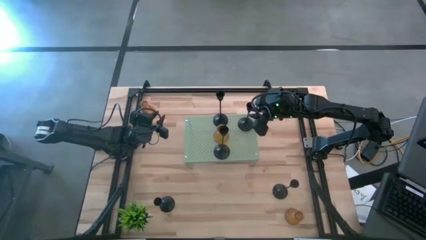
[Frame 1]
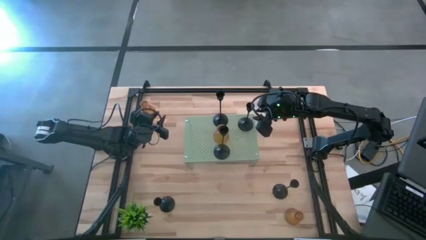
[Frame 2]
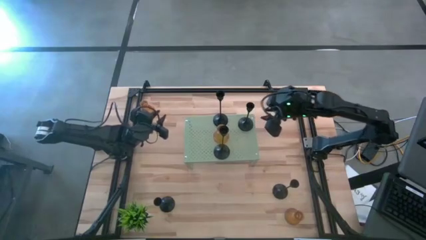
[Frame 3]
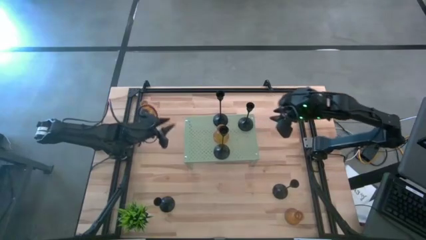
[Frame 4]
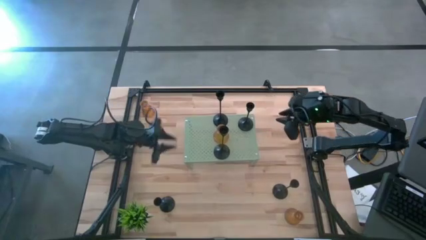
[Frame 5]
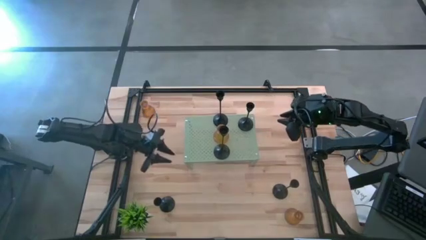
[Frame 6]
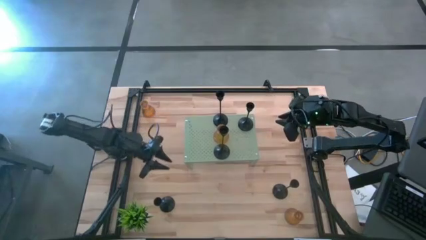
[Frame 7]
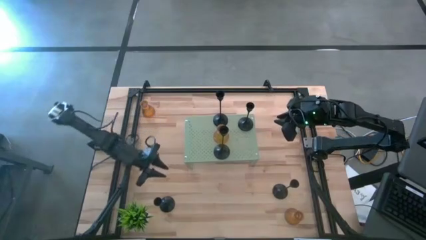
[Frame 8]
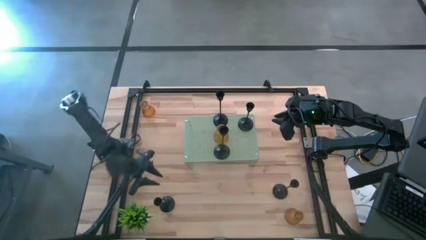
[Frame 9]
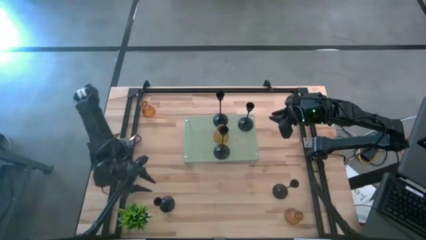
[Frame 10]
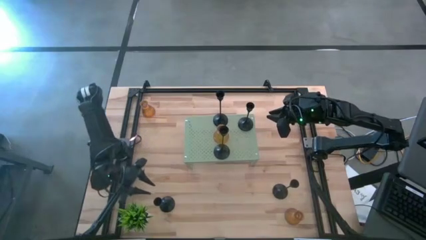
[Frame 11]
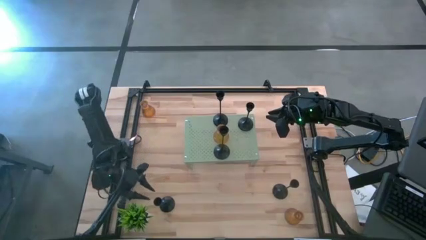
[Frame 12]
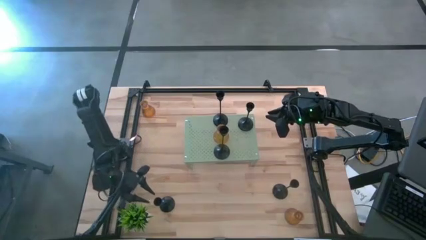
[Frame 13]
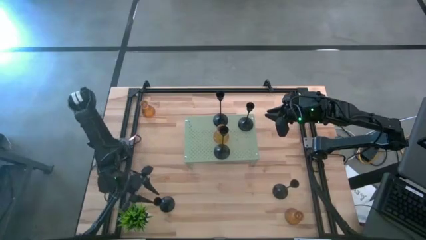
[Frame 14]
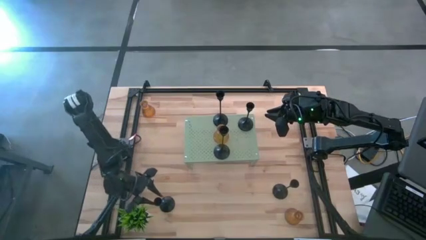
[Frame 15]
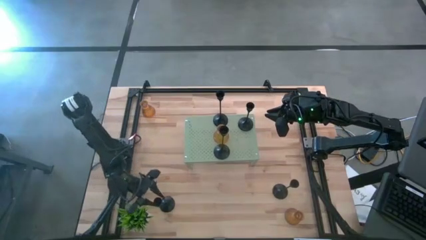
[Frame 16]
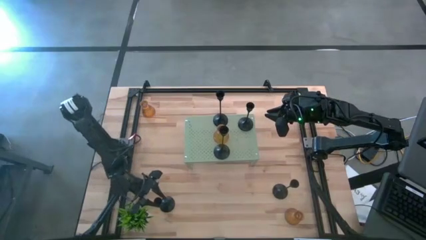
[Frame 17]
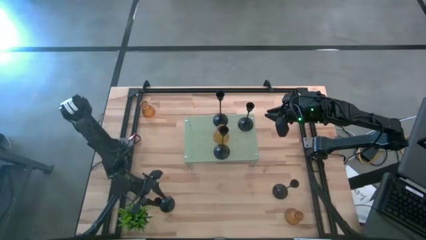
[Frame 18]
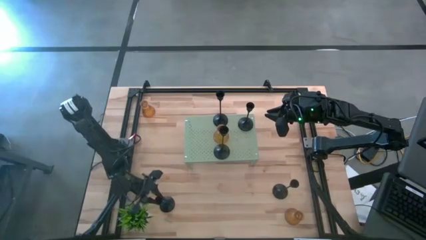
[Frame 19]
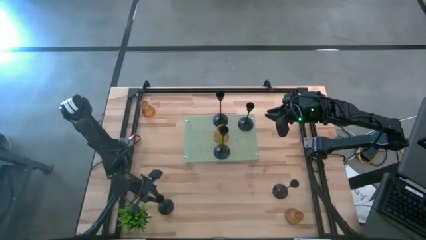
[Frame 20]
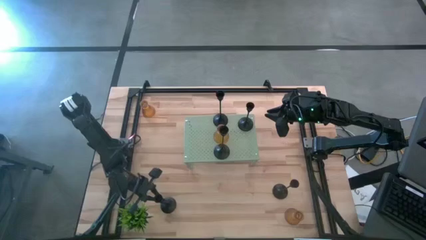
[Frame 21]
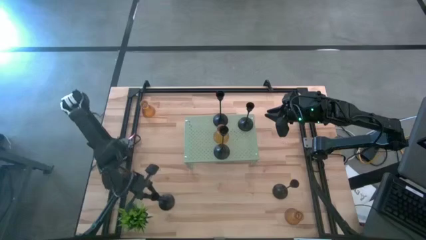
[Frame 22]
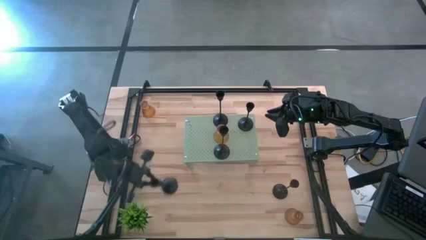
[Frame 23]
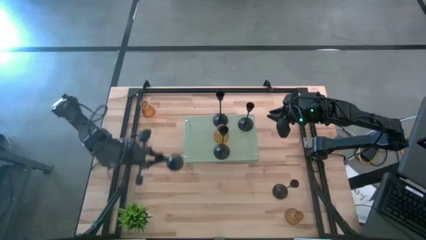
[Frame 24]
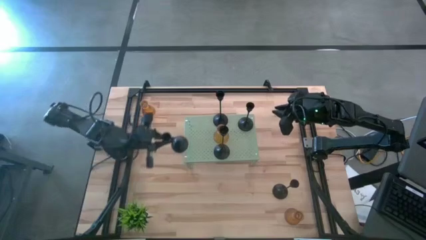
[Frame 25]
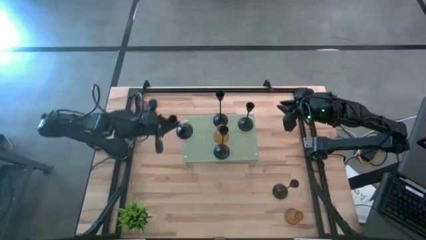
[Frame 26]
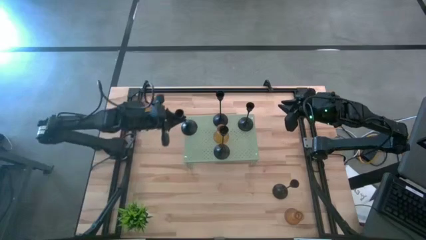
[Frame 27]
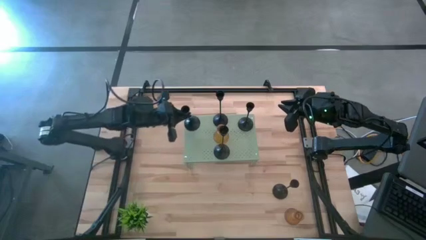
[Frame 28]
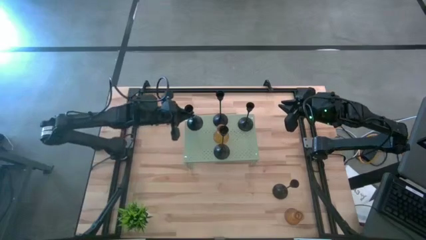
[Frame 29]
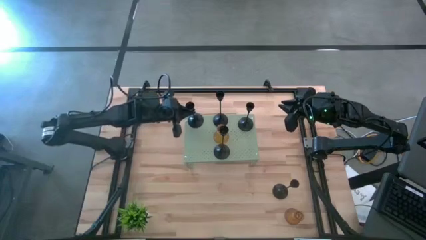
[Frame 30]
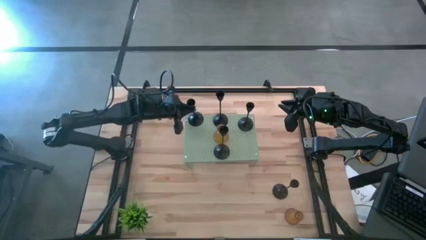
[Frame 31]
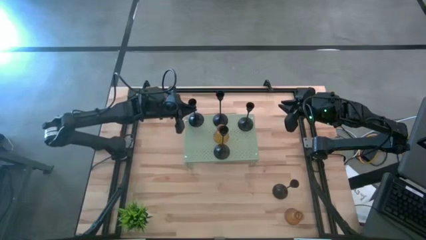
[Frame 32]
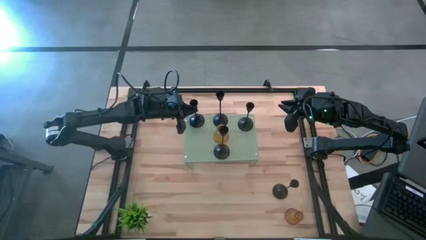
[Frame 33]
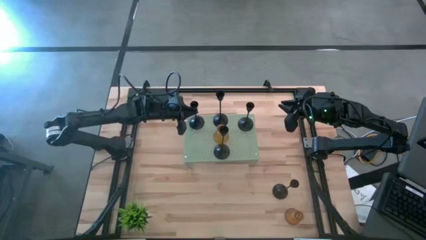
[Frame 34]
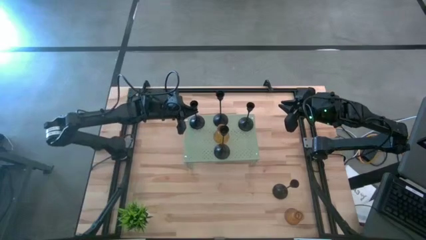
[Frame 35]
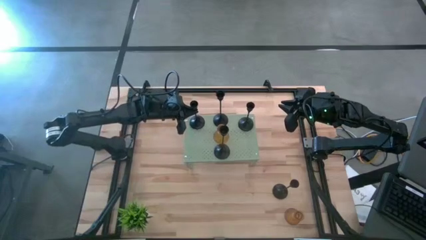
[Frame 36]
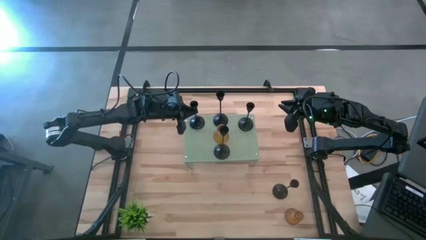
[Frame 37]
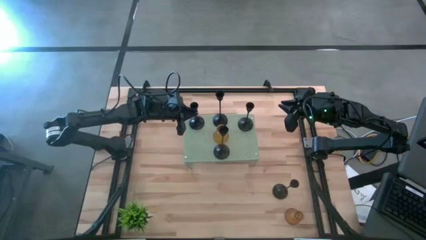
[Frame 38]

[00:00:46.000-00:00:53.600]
Task: Pick & Place candle stick holders
Put the bottom left candlestick on the shelf
